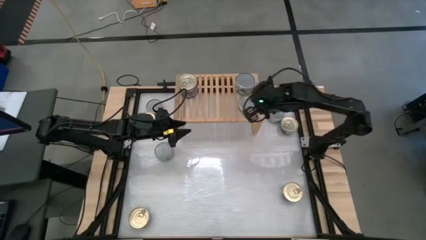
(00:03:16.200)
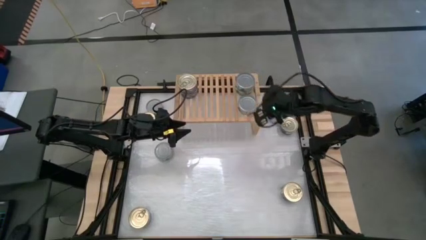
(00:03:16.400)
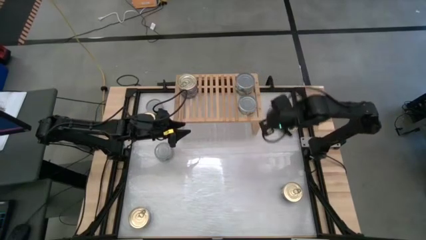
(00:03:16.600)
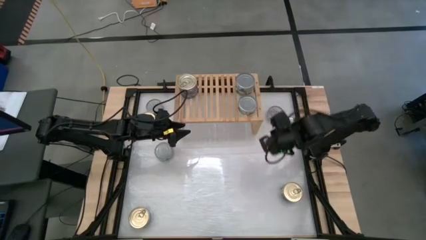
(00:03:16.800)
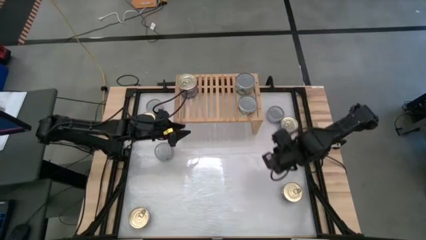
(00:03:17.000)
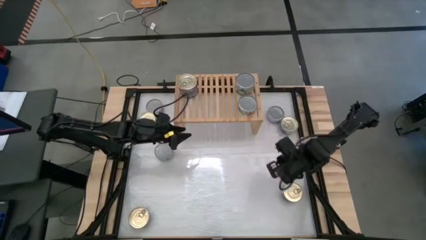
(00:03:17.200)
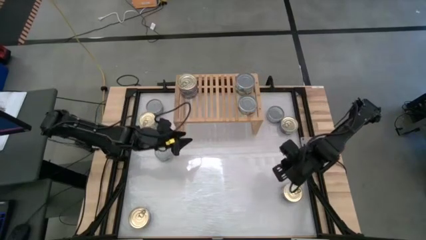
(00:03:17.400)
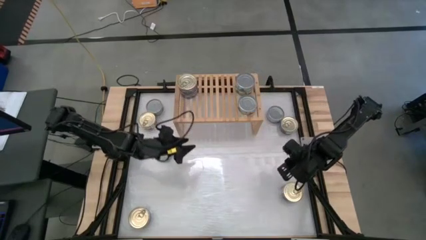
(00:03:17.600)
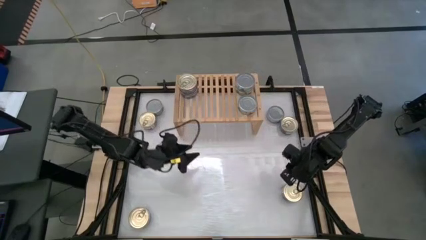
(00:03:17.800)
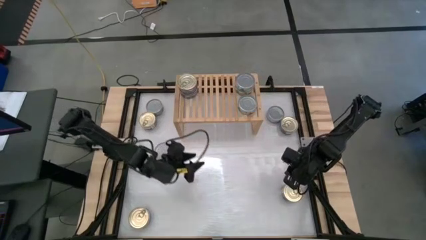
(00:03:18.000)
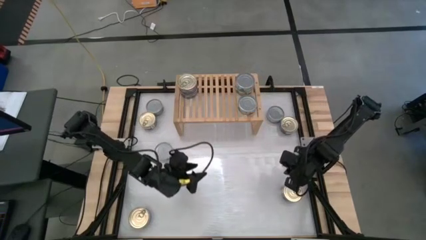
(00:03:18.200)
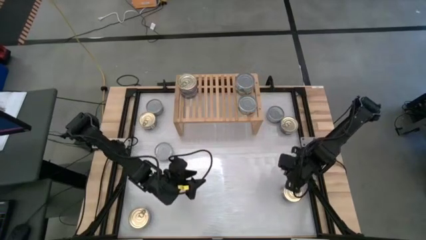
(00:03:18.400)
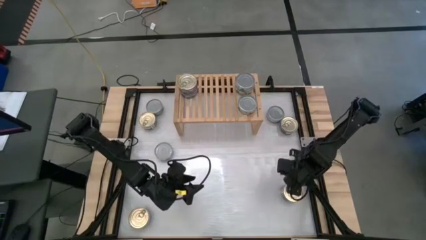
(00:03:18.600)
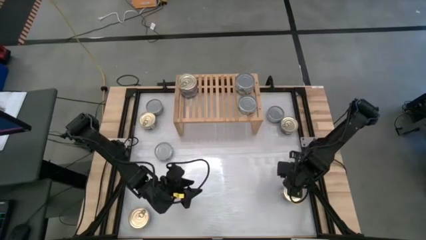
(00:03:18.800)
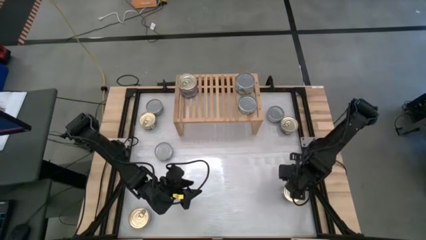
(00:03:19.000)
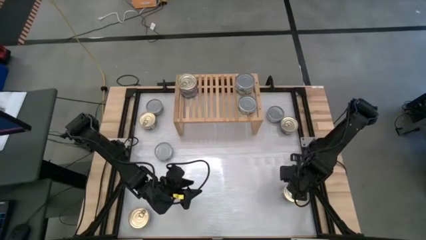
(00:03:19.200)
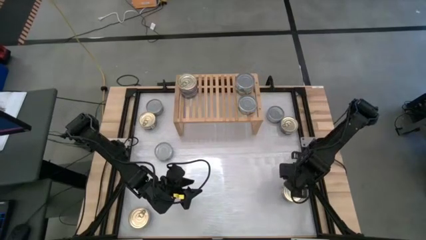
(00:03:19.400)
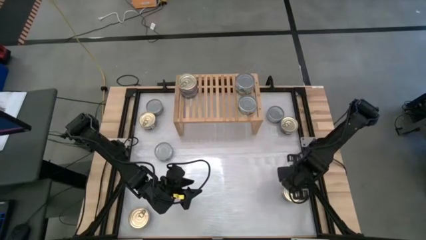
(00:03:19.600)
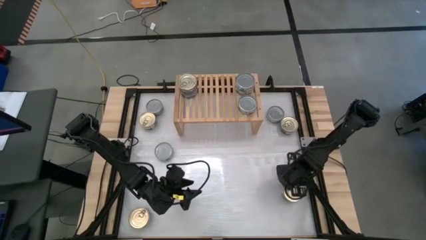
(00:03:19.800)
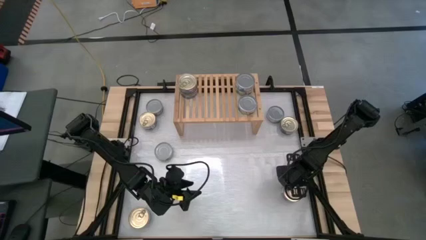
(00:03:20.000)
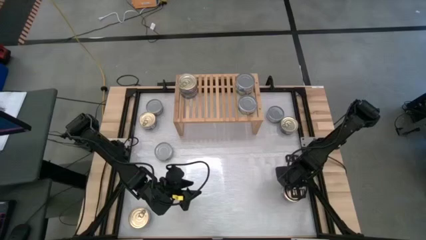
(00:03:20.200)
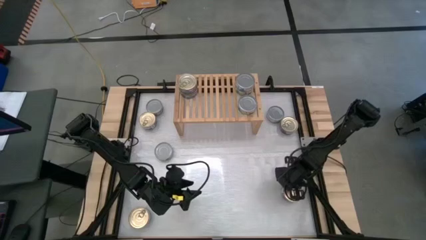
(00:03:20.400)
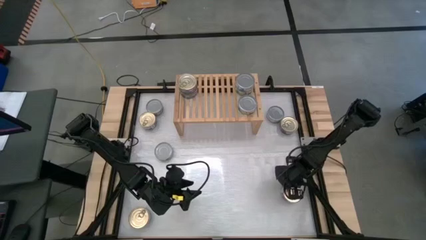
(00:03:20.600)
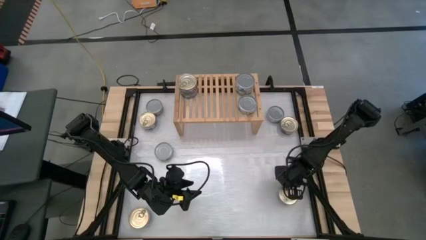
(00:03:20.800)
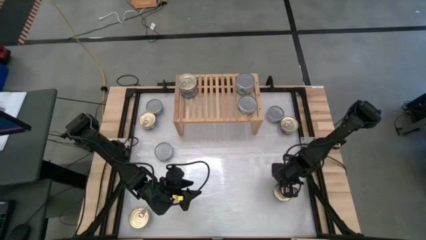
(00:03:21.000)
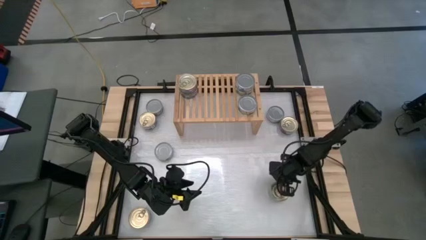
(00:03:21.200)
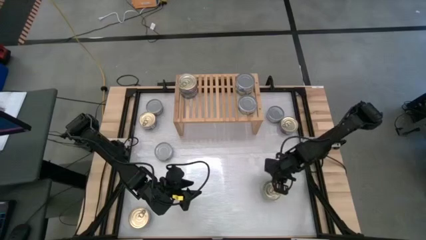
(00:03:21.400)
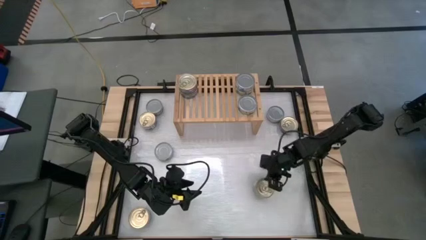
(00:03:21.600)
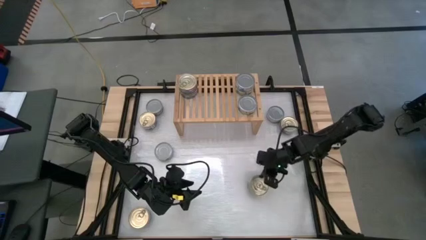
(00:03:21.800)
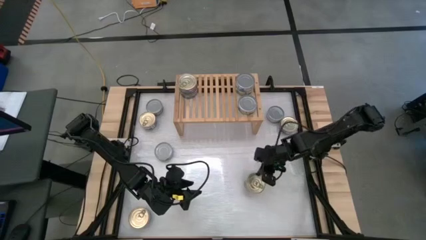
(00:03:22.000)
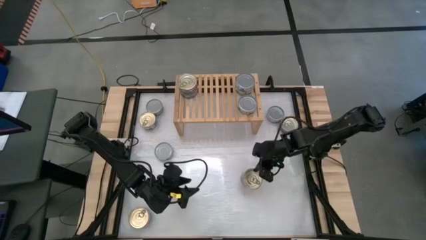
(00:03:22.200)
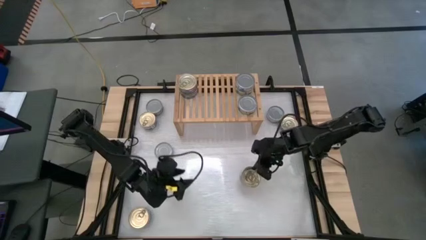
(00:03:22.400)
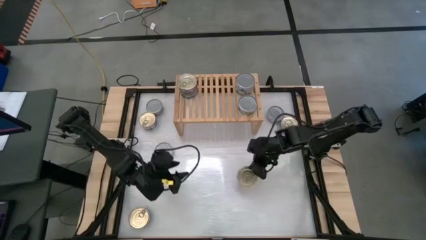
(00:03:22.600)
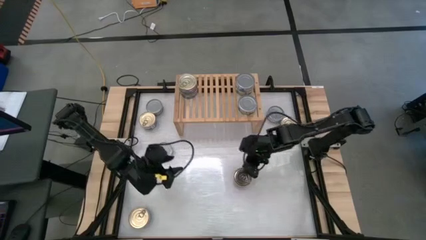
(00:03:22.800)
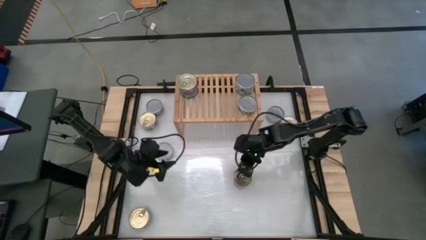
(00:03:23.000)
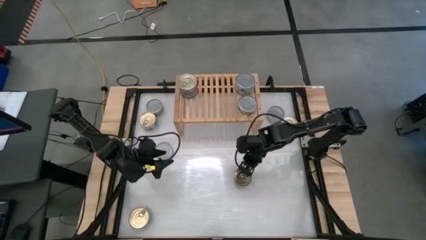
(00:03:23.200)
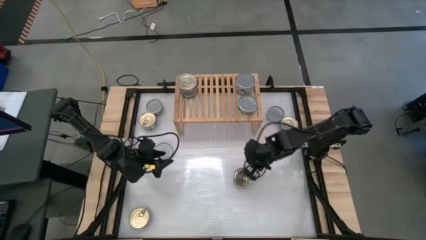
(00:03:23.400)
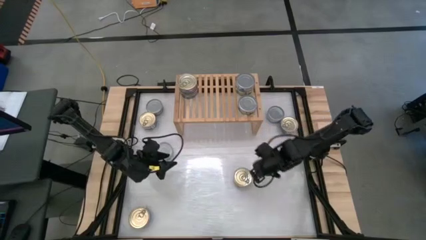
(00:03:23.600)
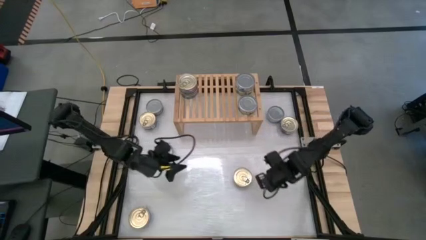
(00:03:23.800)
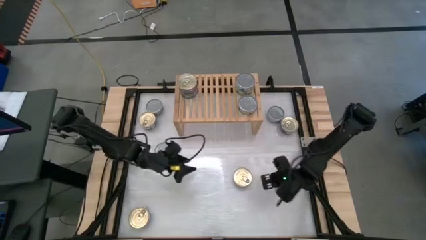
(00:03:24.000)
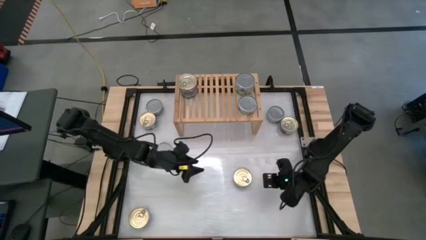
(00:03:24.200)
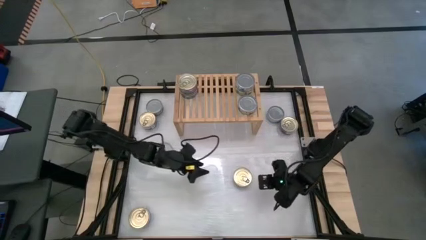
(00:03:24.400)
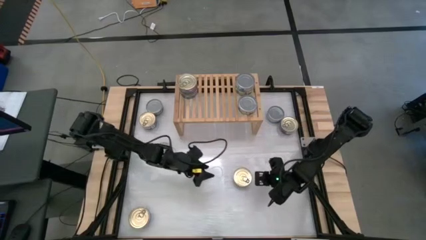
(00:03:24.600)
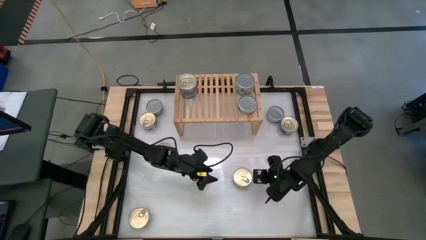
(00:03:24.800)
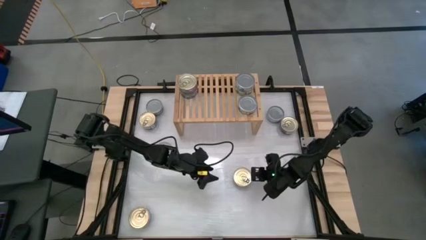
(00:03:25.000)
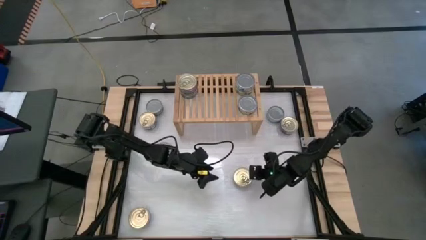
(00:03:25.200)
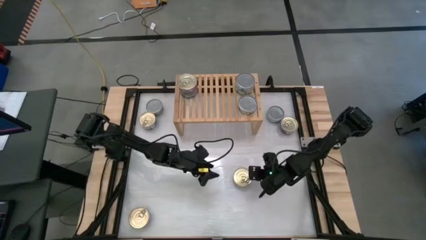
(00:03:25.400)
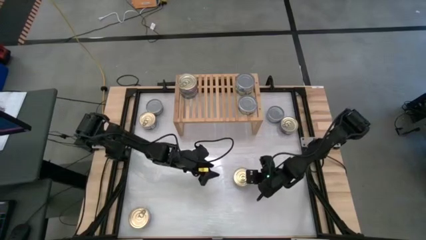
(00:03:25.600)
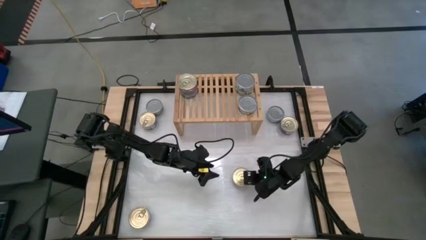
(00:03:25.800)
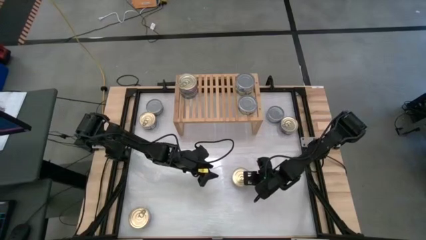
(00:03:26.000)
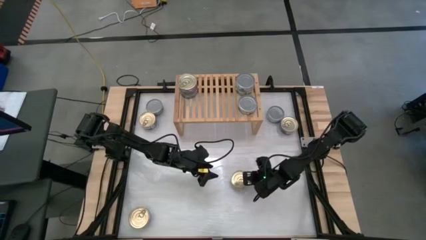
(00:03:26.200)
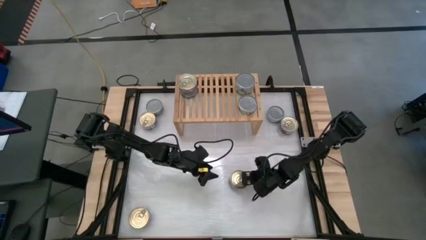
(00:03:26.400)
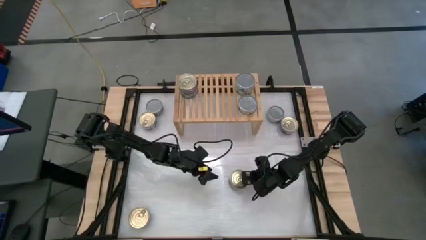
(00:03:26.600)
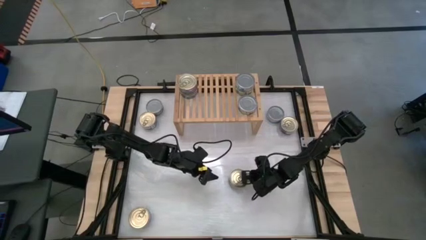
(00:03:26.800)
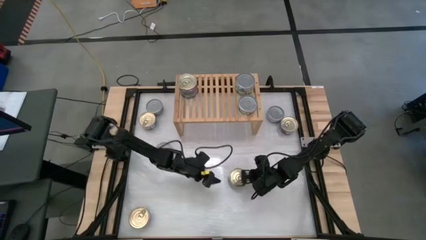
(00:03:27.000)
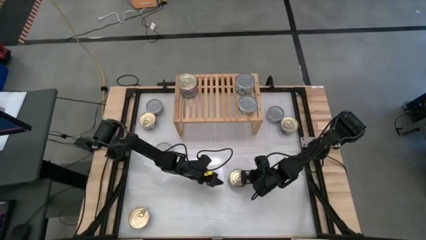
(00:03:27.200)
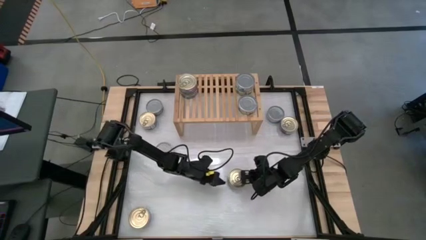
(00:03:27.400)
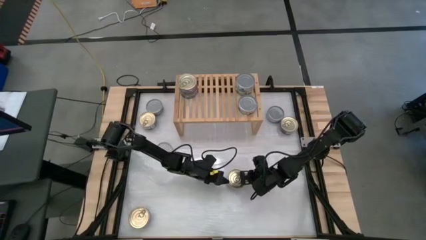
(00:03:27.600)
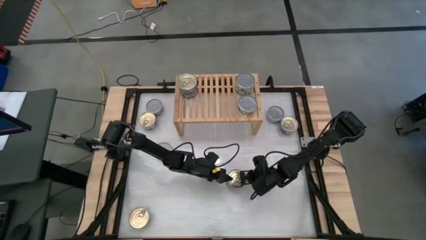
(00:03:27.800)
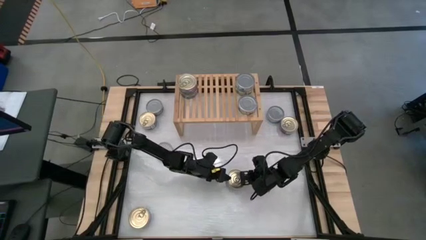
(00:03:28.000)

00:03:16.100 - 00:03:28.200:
Task: Stack canned seafood by type on shelf
Put the blue-pink tuna can on the shelf aligned with the other blue-pink tuna cans
